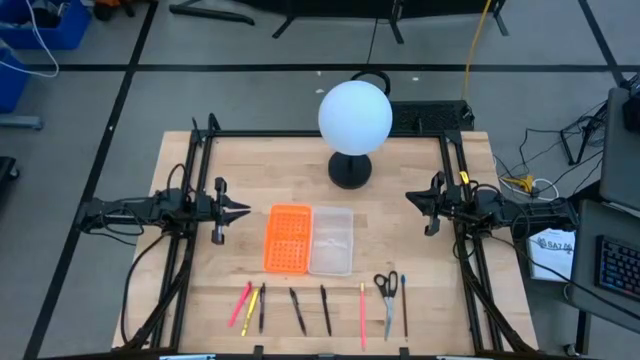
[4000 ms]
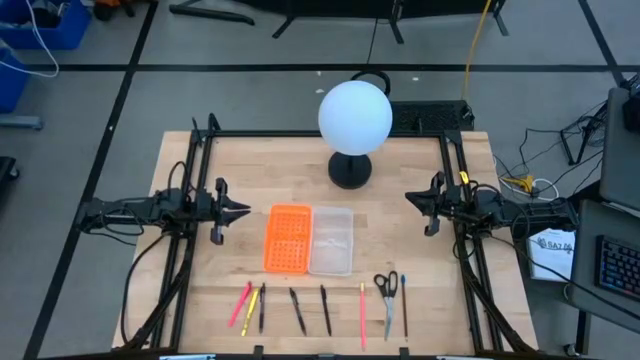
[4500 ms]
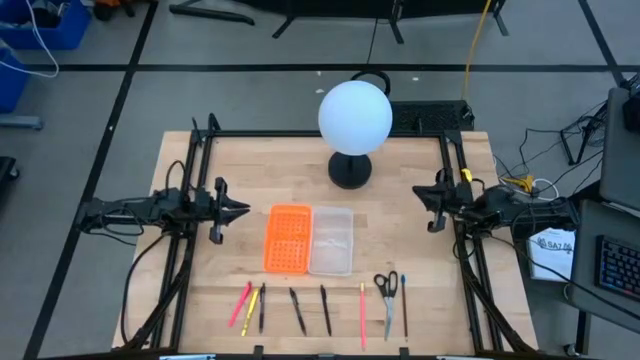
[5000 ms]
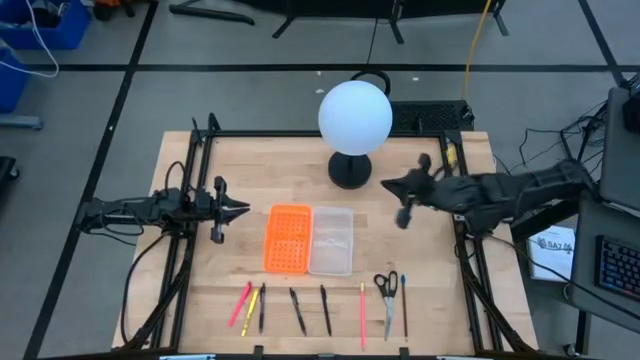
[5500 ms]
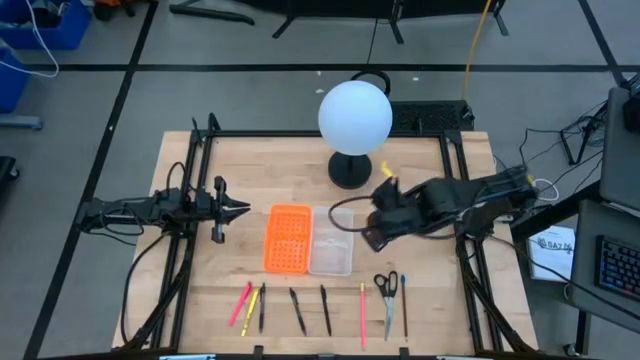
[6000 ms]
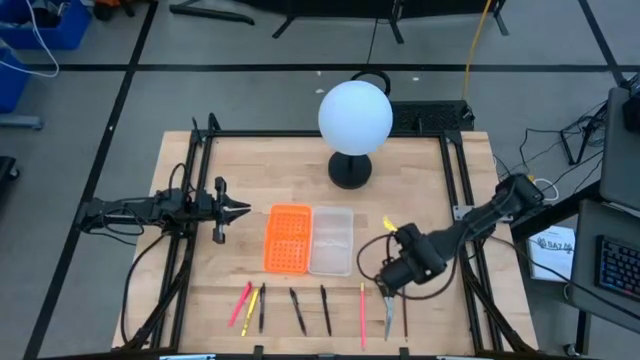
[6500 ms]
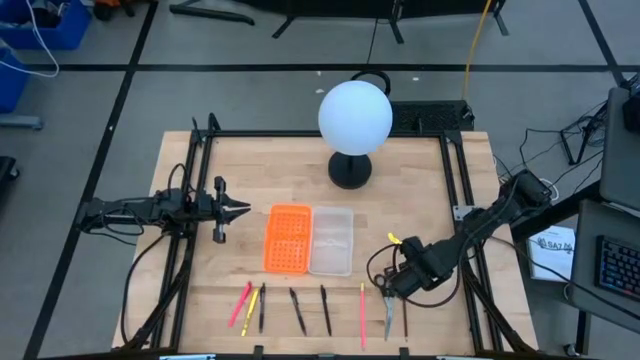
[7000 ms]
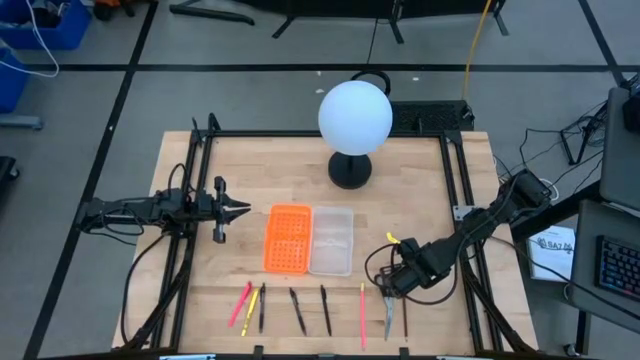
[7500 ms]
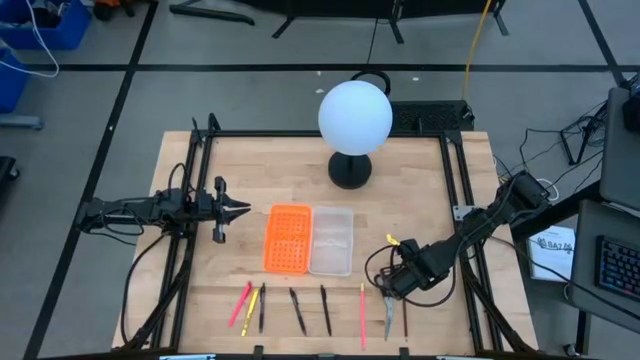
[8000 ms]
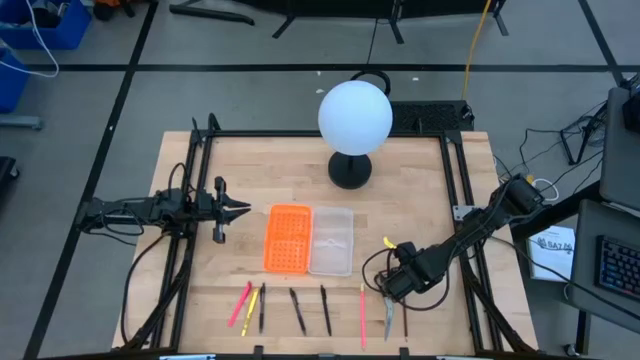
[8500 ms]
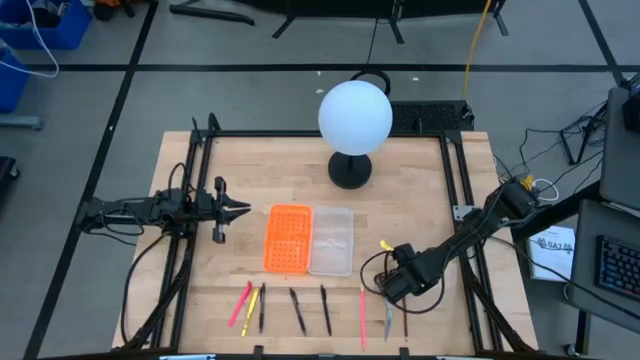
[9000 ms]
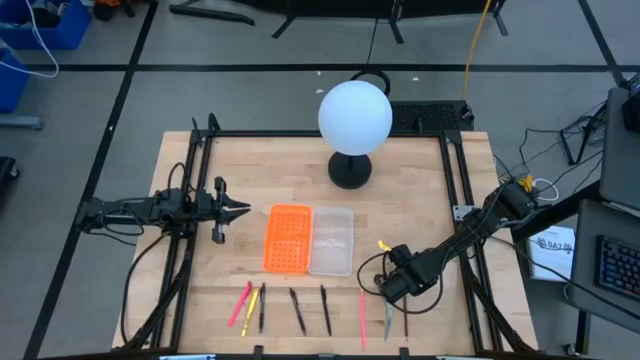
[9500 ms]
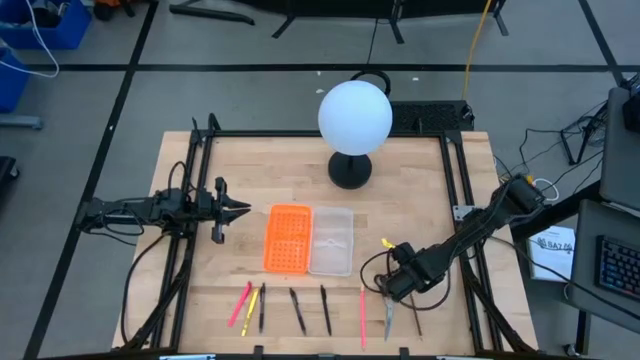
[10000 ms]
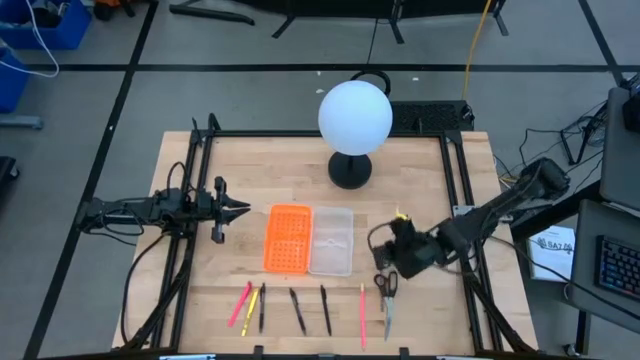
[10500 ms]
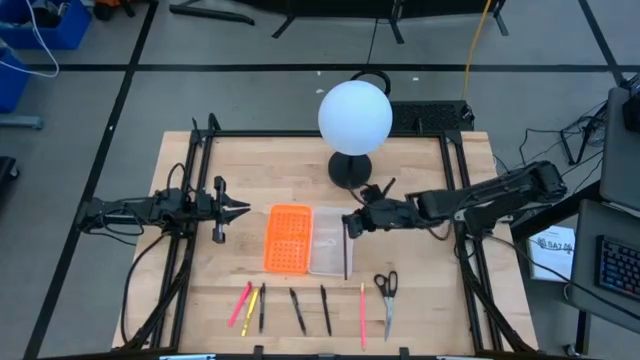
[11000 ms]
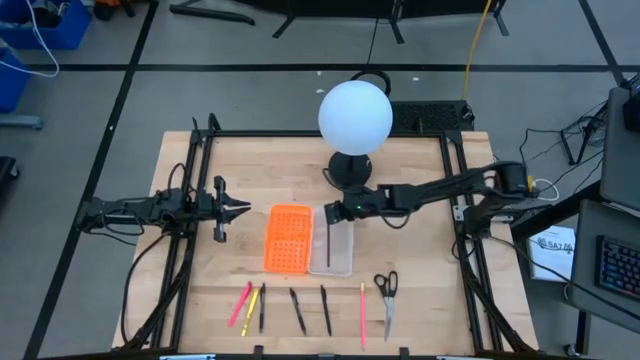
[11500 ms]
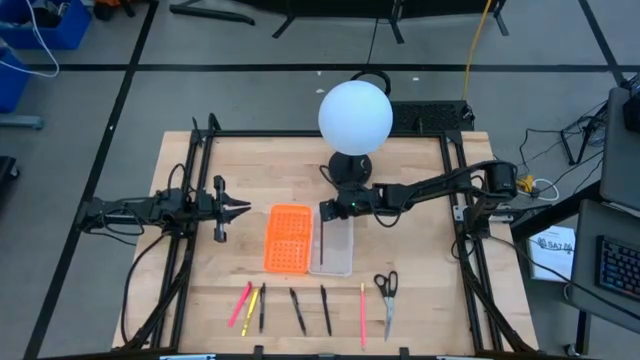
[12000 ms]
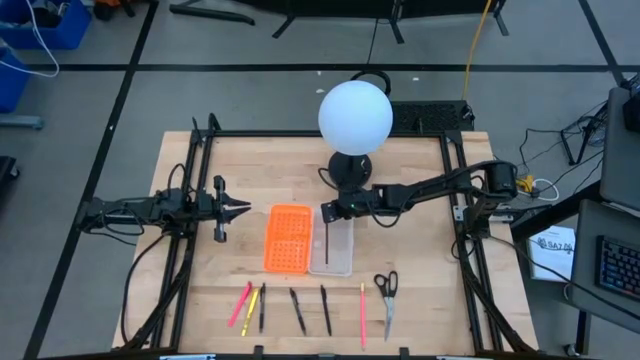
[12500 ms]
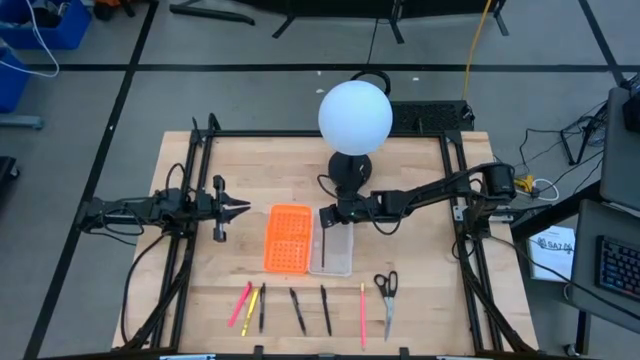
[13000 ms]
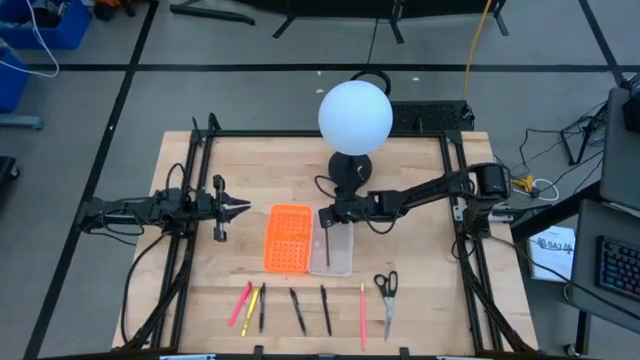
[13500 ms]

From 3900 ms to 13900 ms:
Task: Pick & place school supplies into a supply box
Put the brown pencil into the supply box

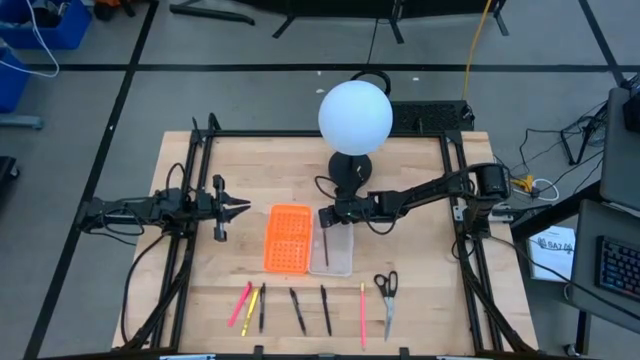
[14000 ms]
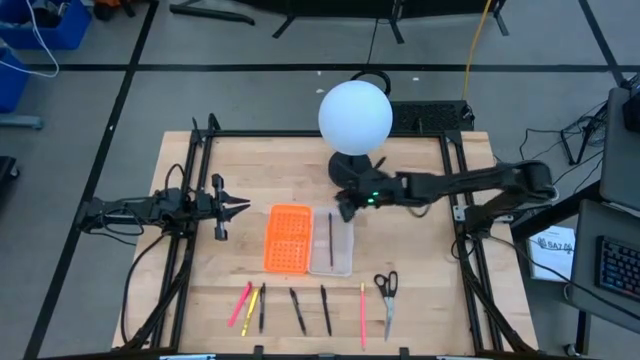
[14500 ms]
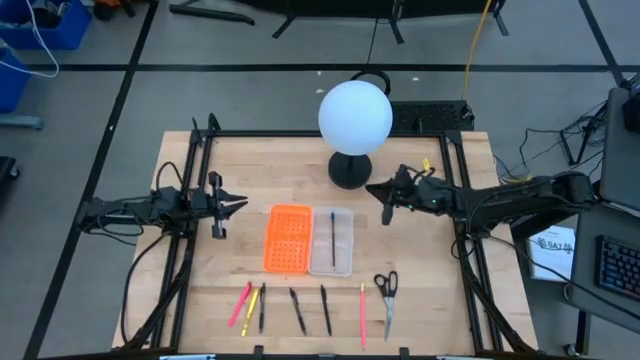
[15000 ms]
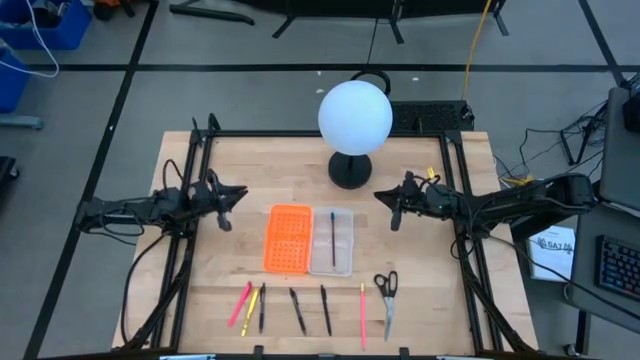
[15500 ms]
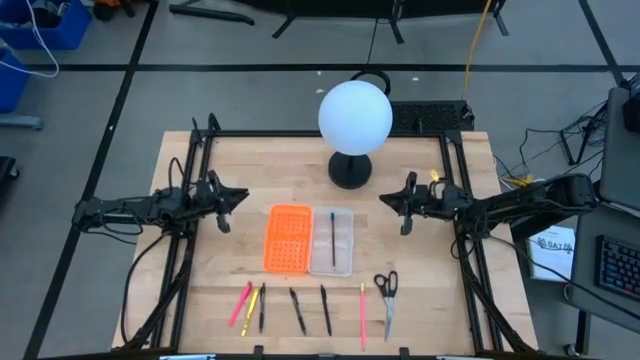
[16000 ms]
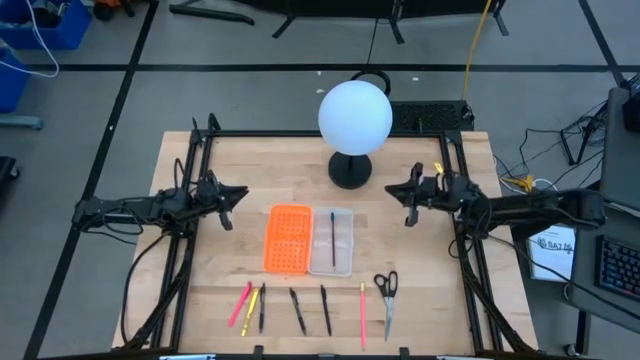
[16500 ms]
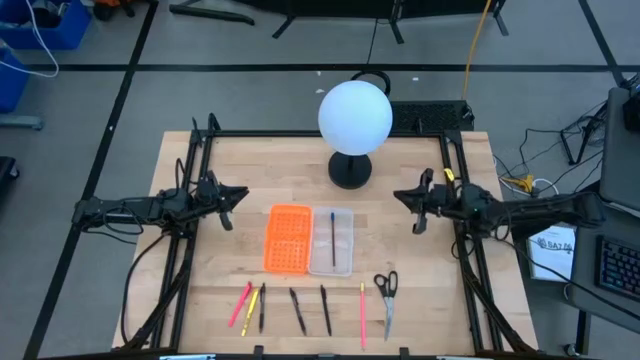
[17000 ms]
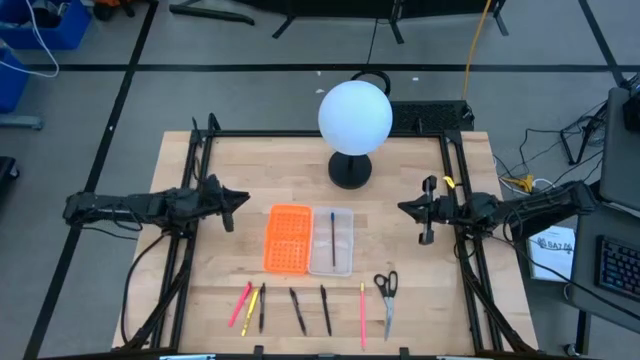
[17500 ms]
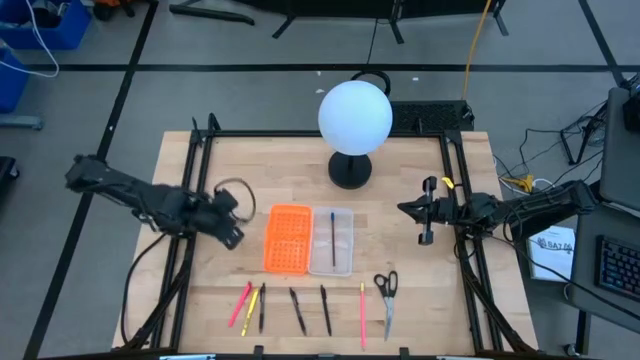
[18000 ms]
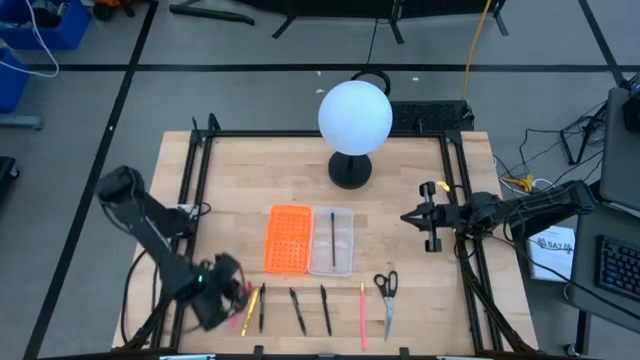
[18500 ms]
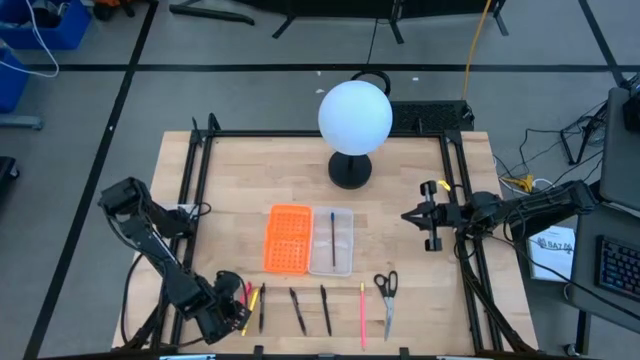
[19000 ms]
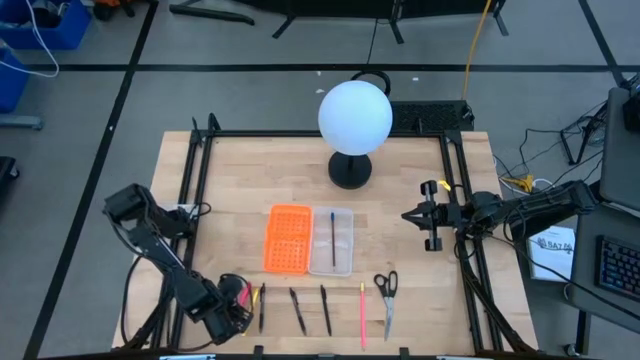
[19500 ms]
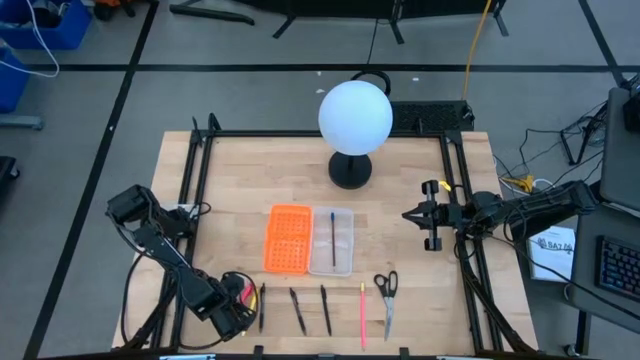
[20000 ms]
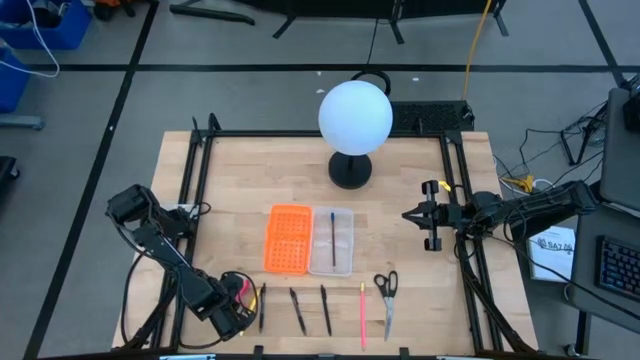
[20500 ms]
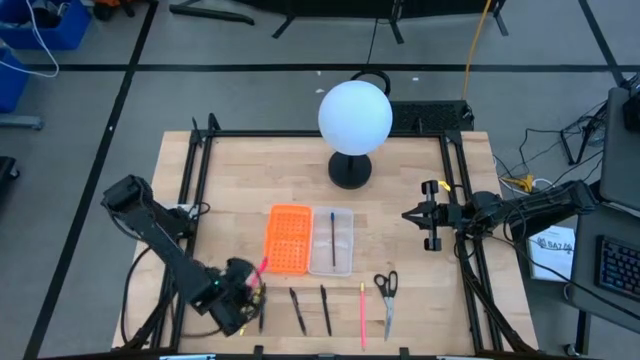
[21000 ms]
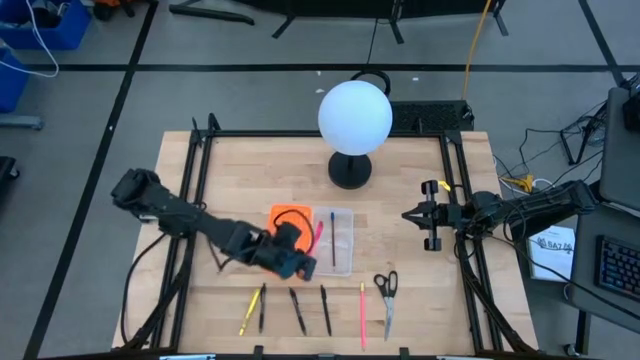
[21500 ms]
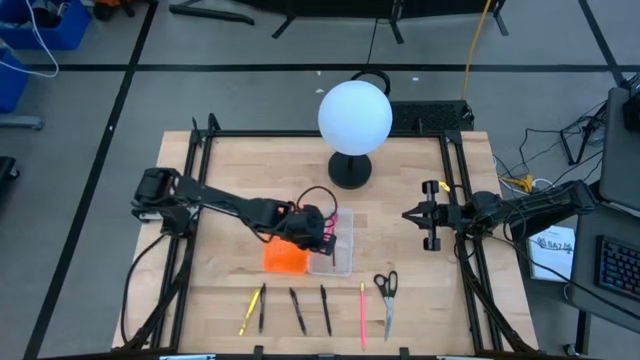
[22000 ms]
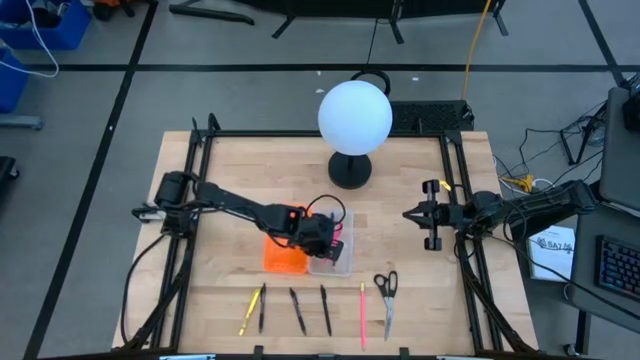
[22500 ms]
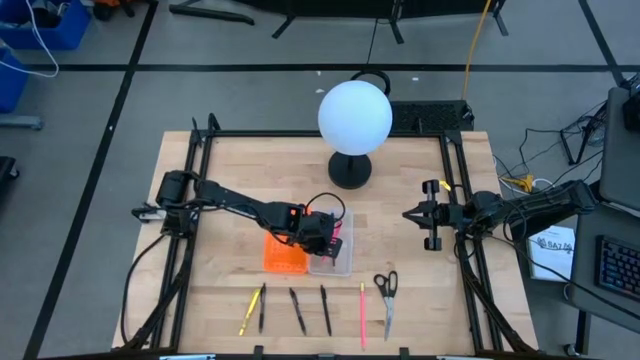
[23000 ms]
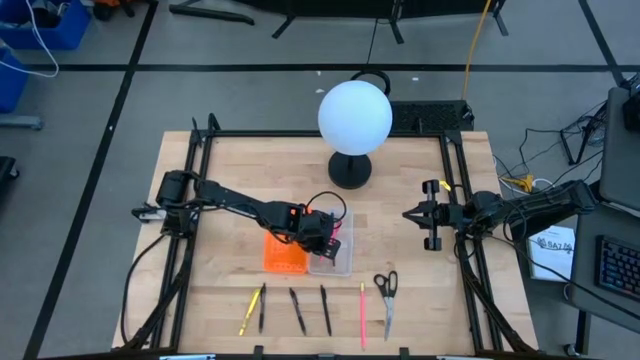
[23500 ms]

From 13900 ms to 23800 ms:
Put the pink pen into the supply box
